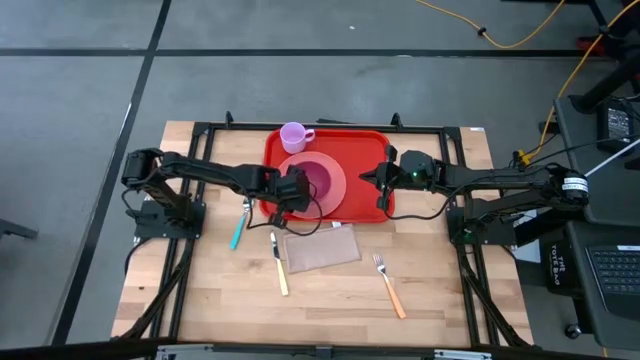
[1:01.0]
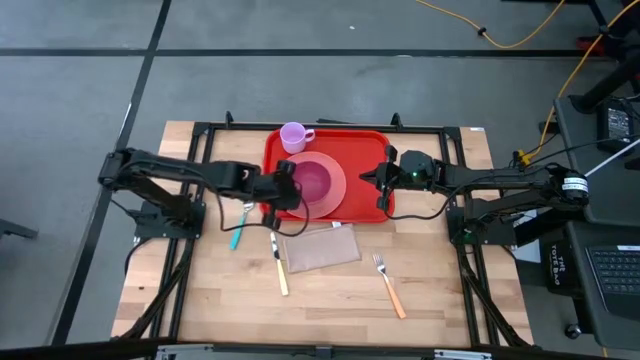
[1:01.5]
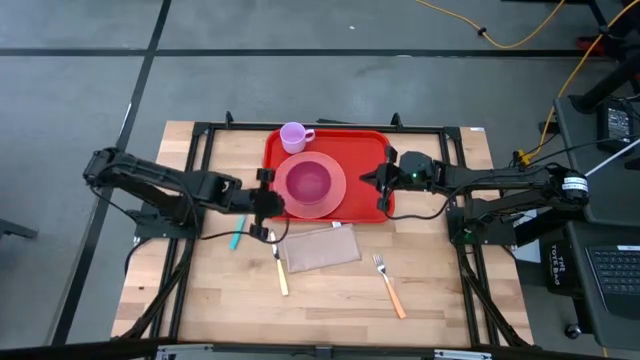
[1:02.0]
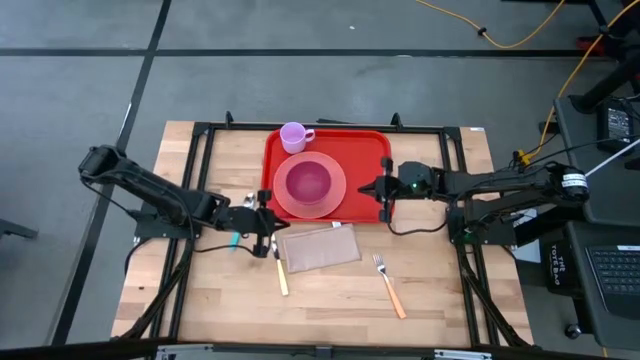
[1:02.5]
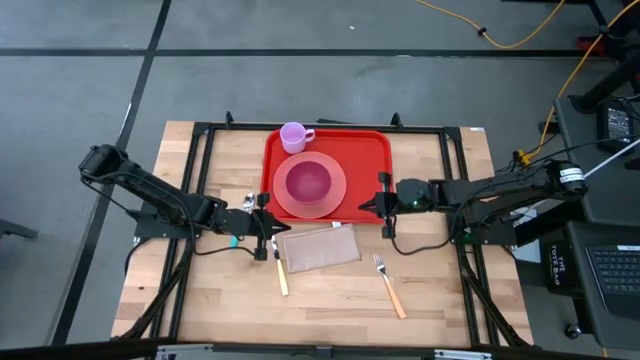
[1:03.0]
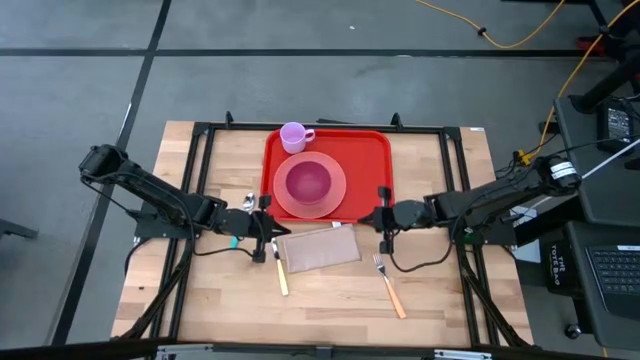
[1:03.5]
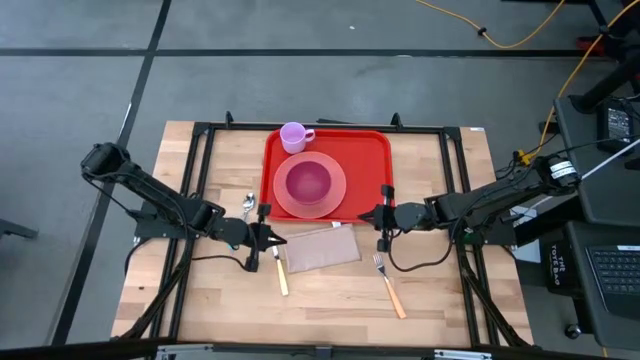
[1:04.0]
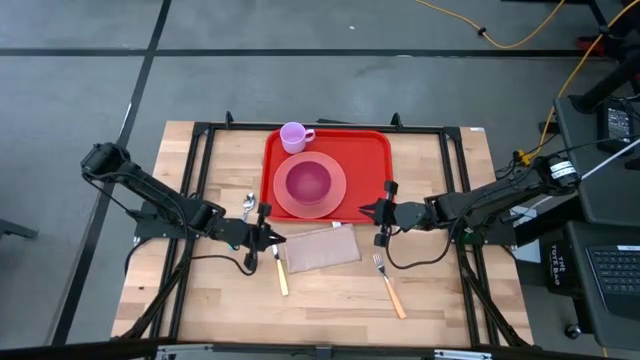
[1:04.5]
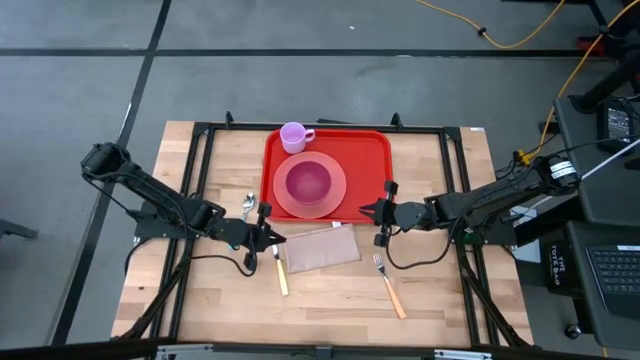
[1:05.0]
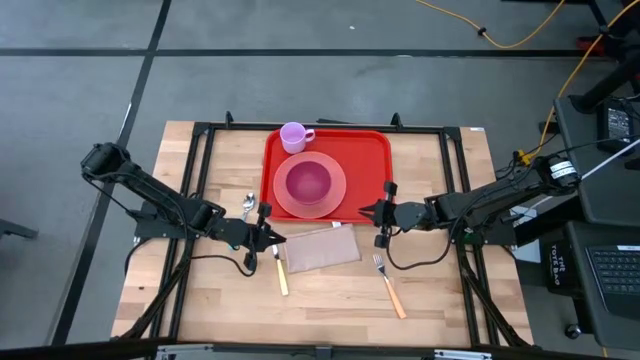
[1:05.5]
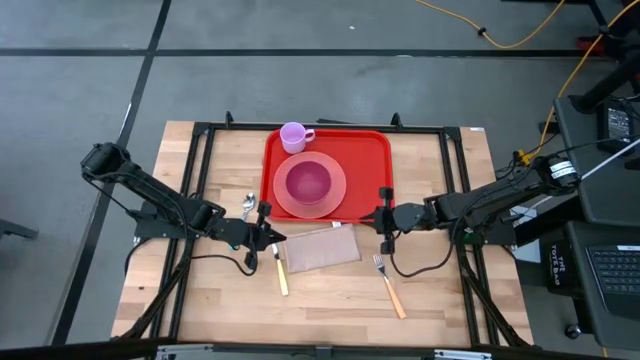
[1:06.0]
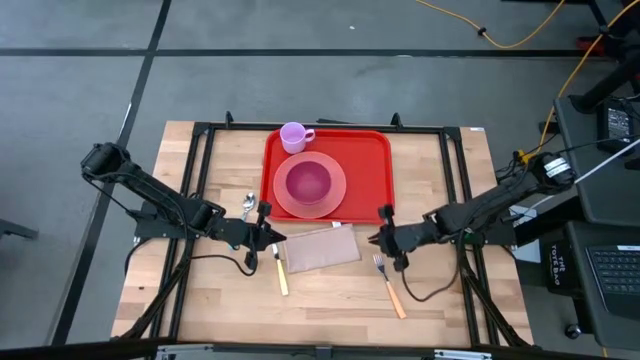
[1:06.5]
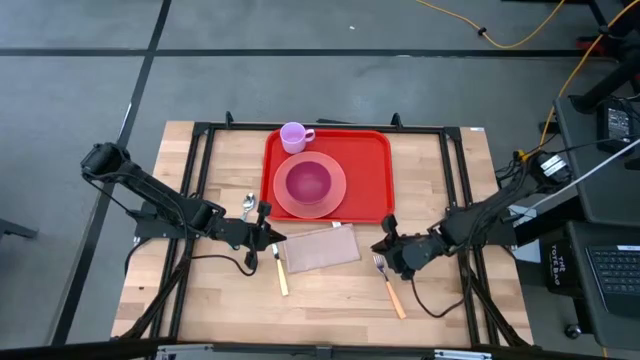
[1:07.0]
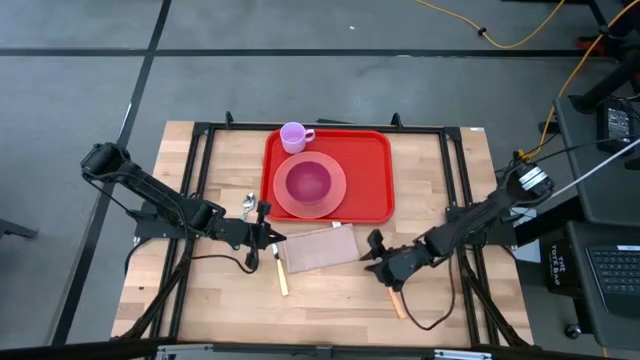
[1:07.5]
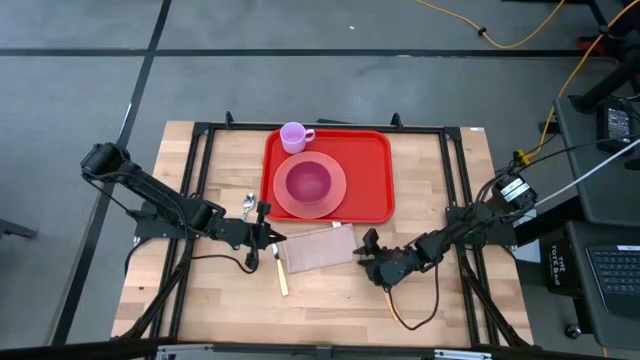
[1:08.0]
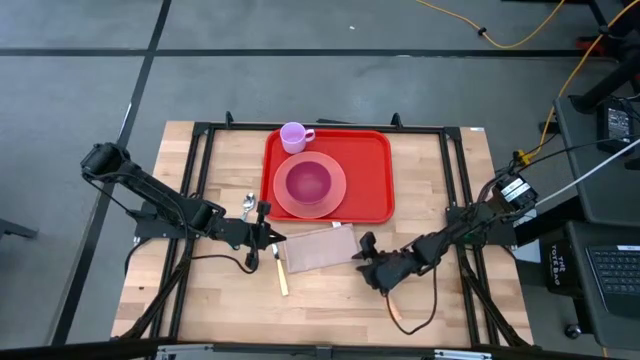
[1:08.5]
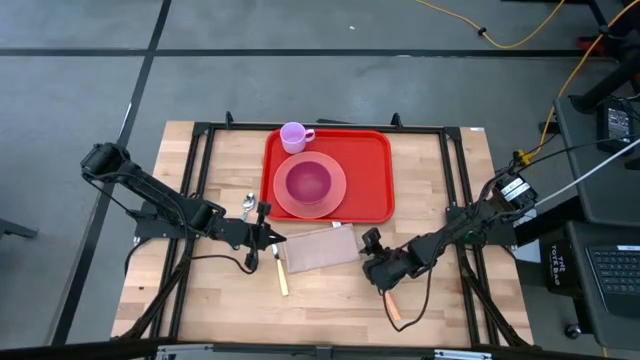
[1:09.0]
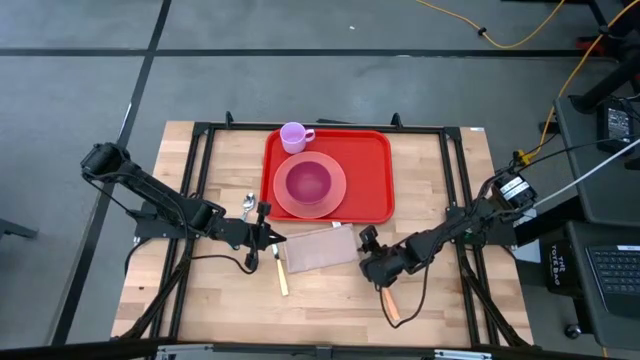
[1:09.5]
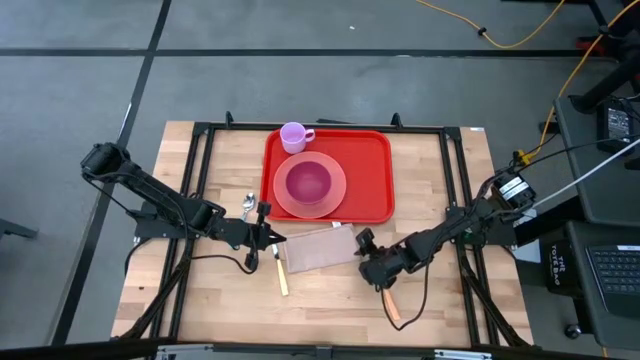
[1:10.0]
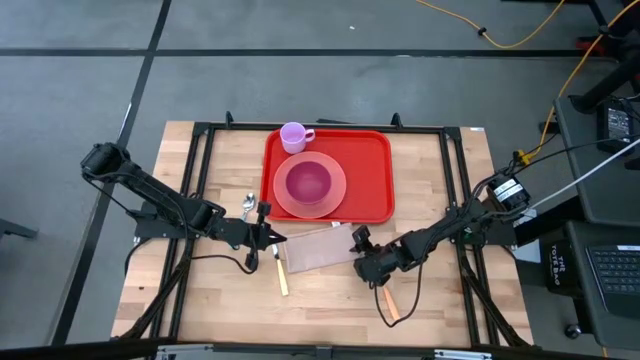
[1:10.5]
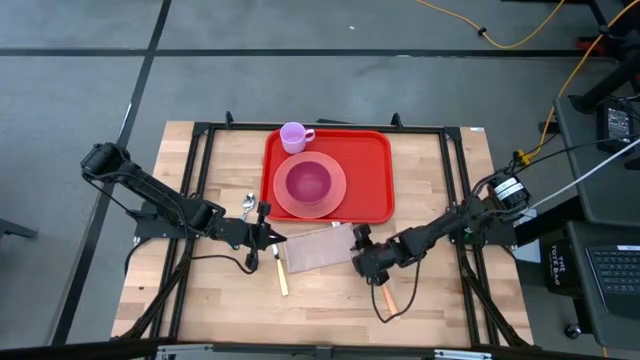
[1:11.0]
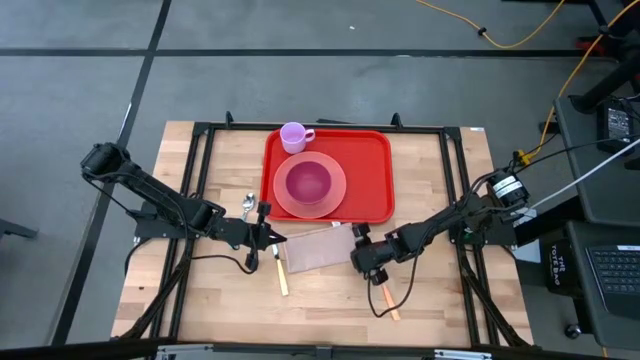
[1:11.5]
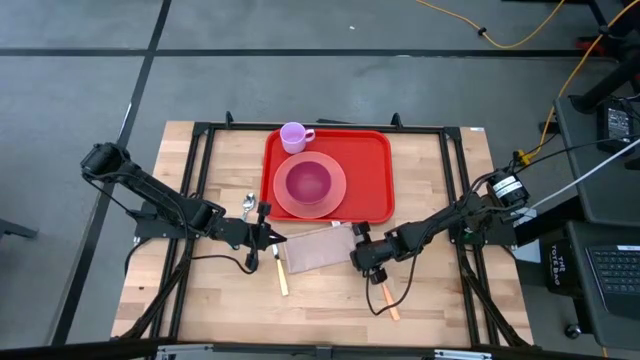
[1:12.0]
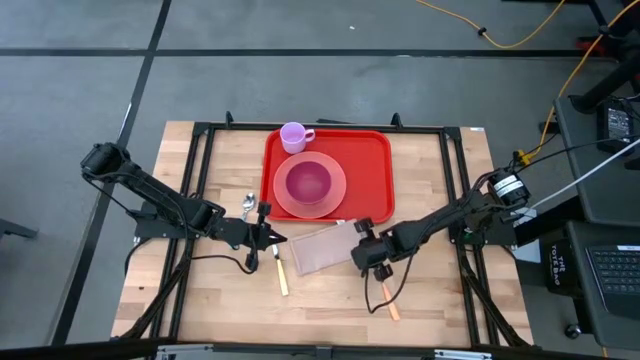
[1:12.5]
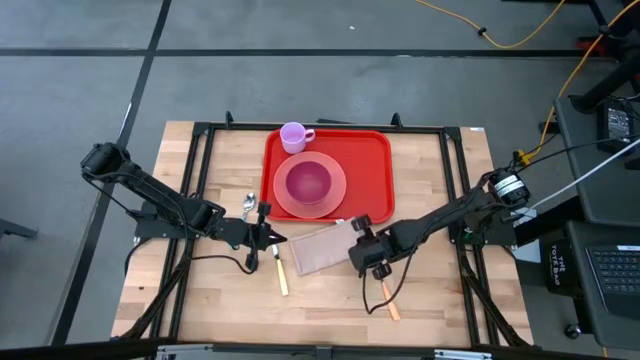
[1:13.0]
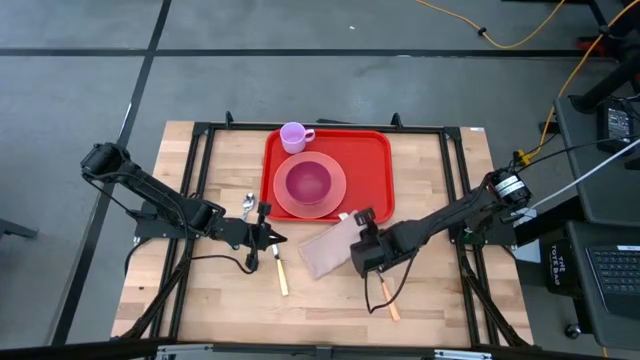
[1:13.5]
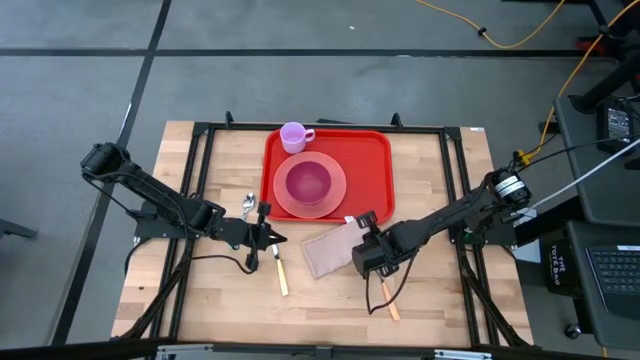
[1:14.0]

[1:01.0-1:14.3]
Task: Set up tray
Put the brown napkin on the red serving tray to the right of the pink plate

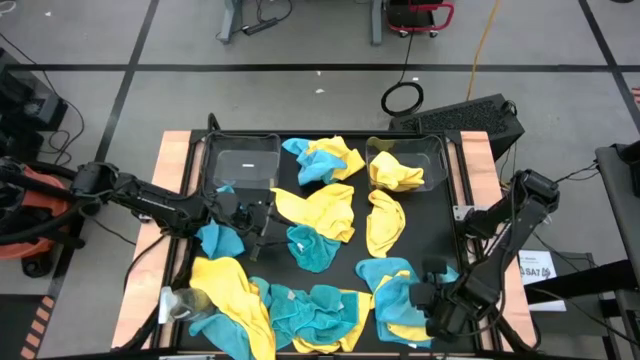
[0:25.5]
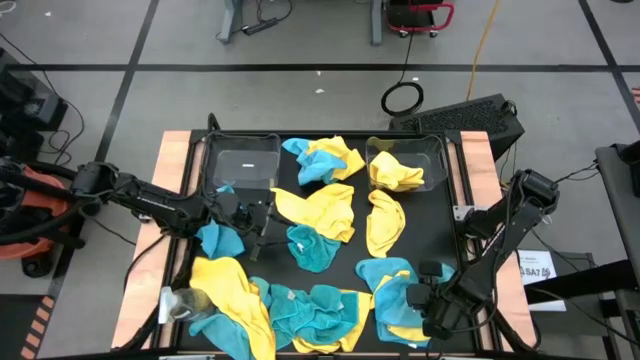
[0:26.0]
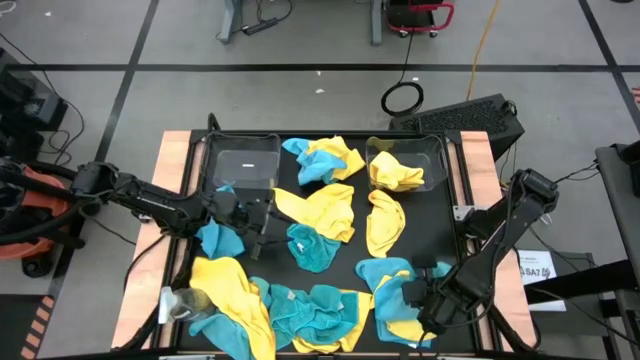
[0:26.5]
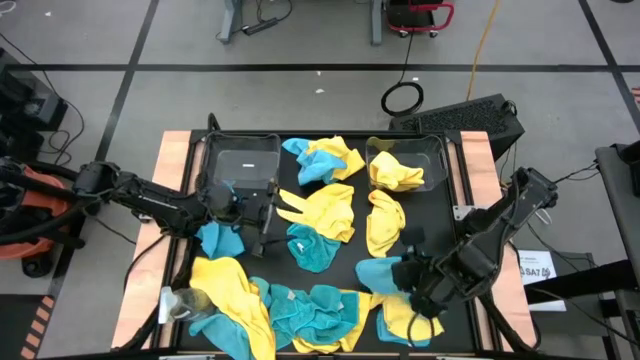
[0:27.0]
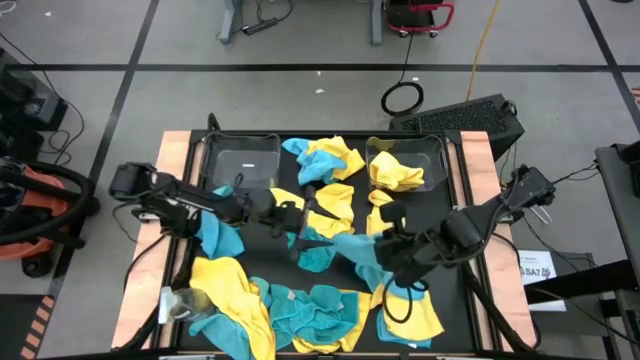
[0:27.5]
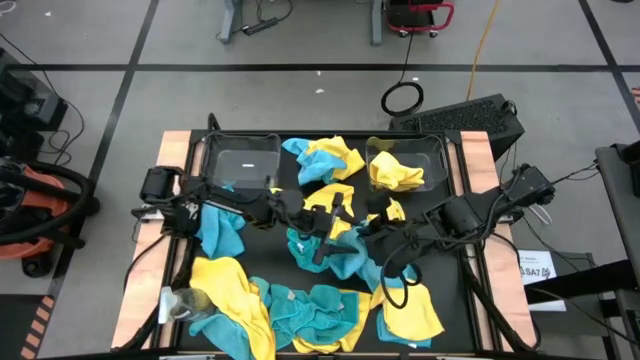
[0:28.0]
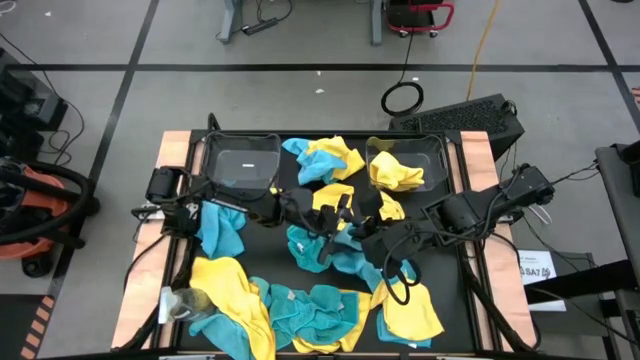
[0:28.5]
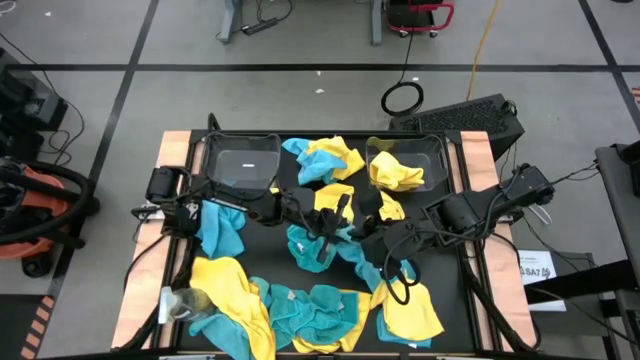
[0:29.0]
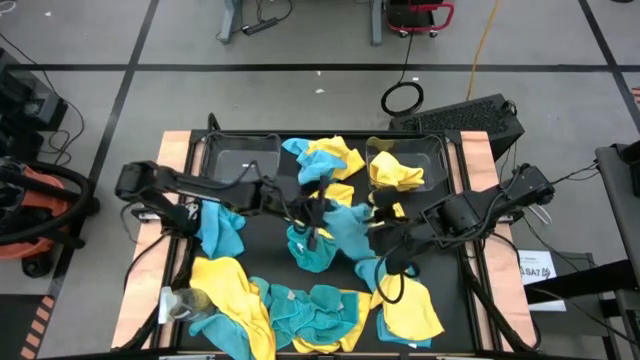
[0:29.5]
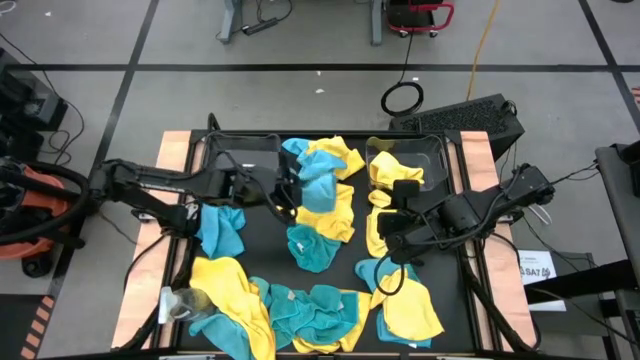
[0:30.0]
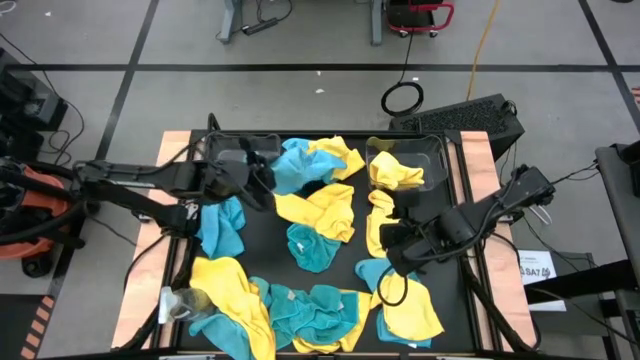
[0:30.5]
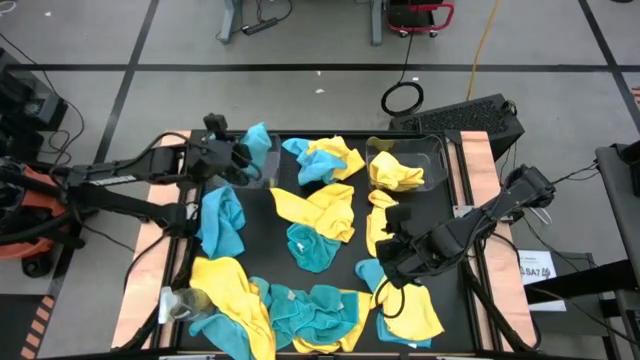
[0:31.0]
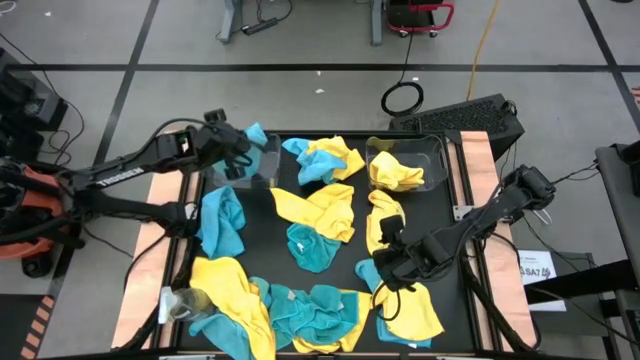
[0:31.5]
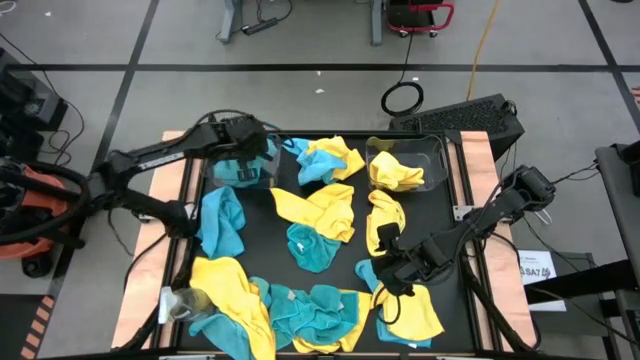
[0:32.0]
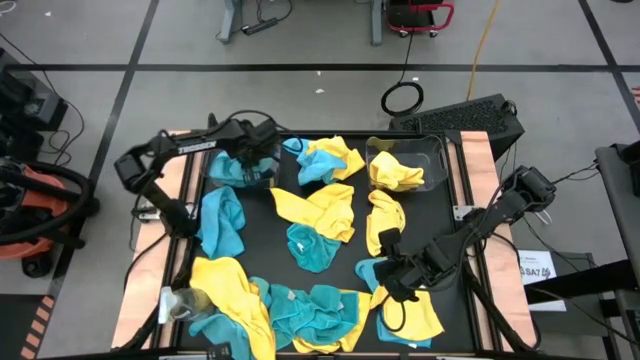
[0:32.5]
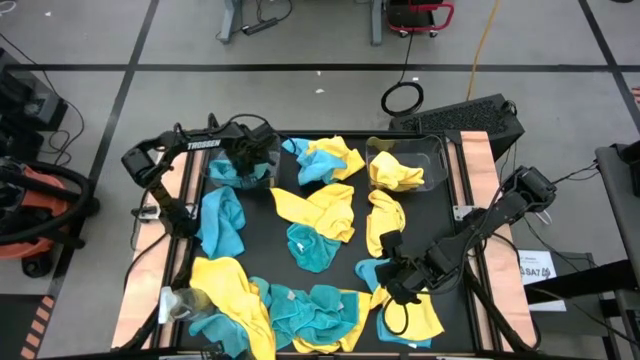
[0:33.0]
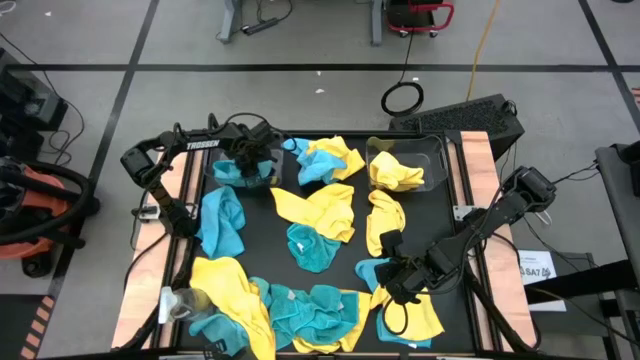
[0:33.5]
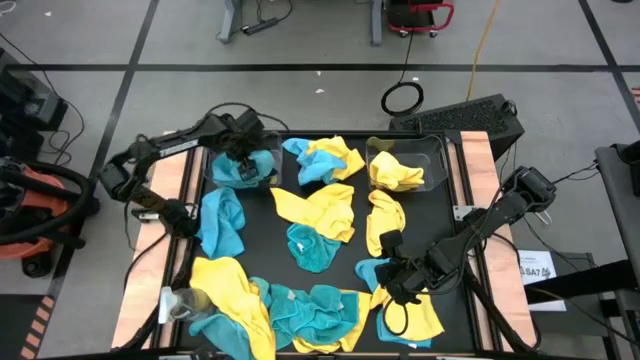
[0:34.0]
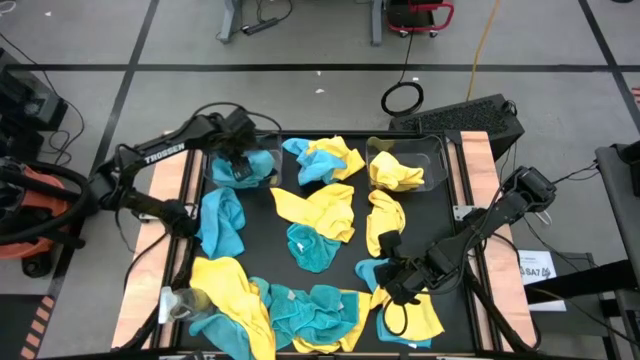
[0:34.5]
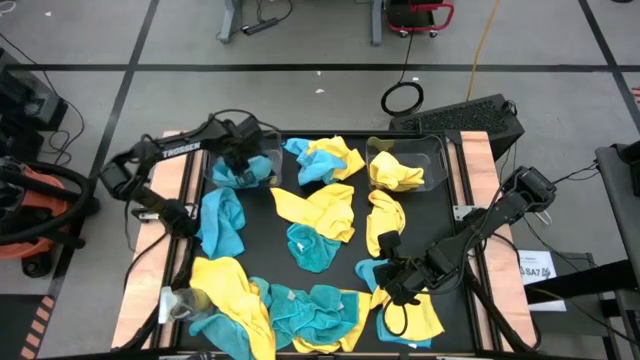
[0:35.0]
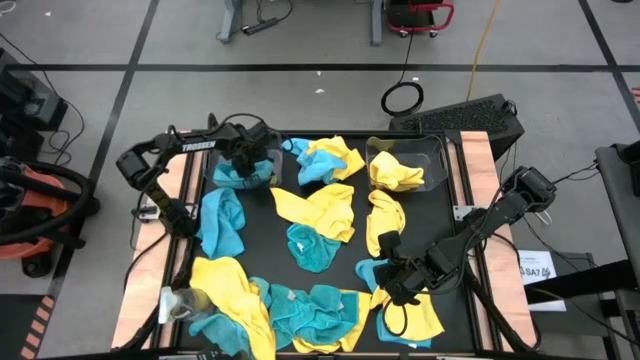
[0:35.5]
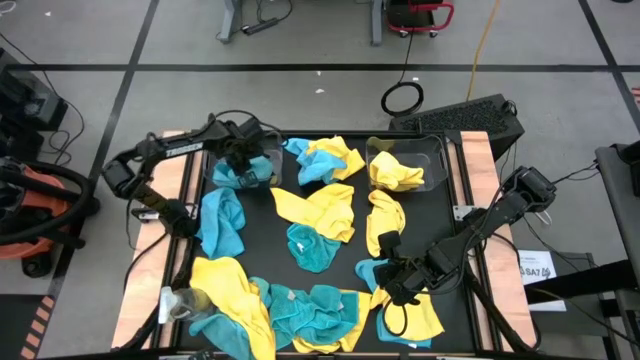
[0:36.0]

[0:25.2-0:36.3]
Task: Sort microfiber towel by color & place in baskets
Put the blue microfiber cloth into the left transparent bin
